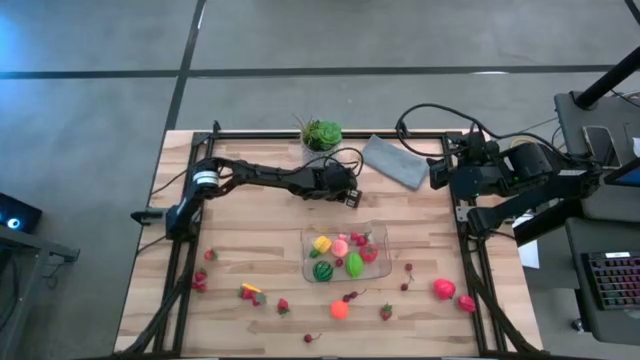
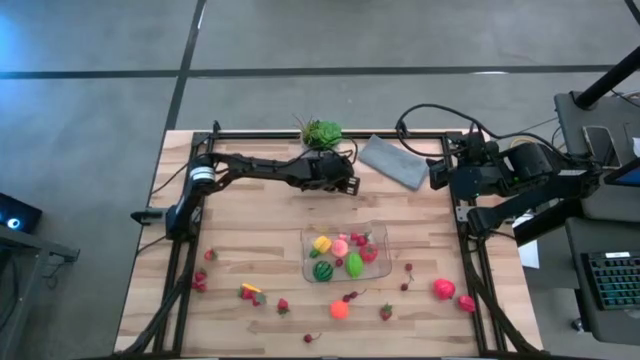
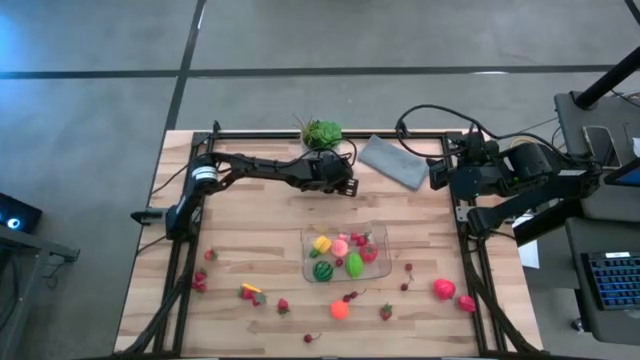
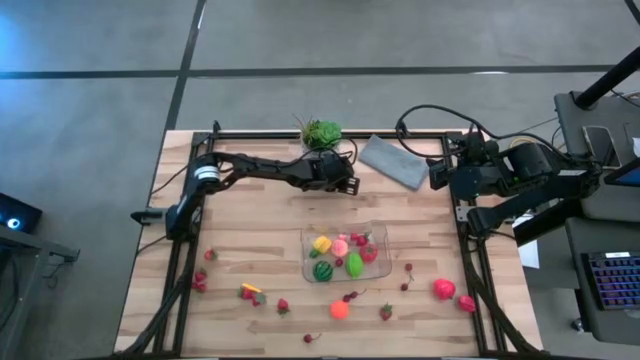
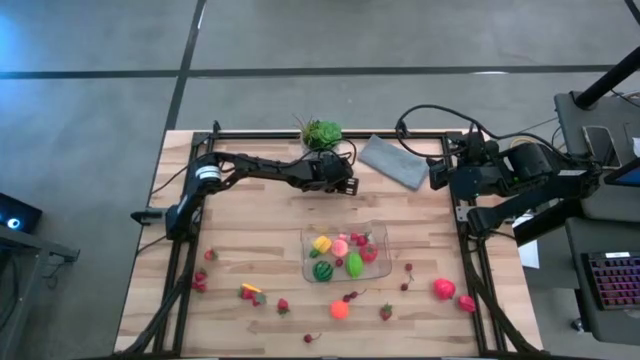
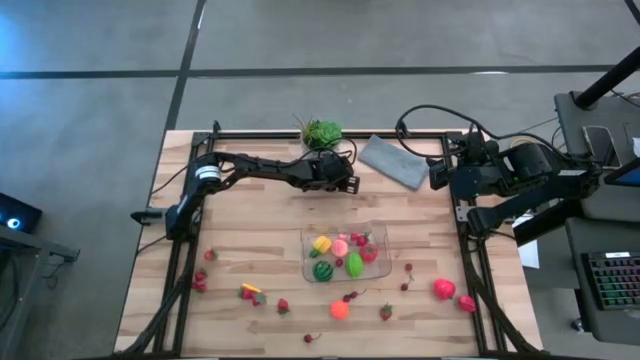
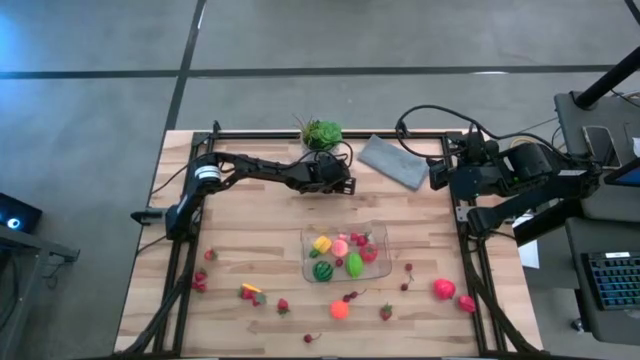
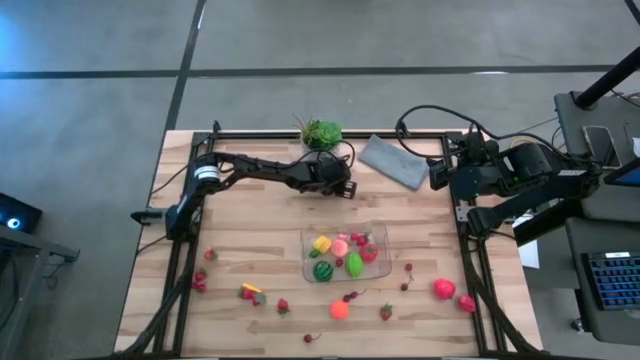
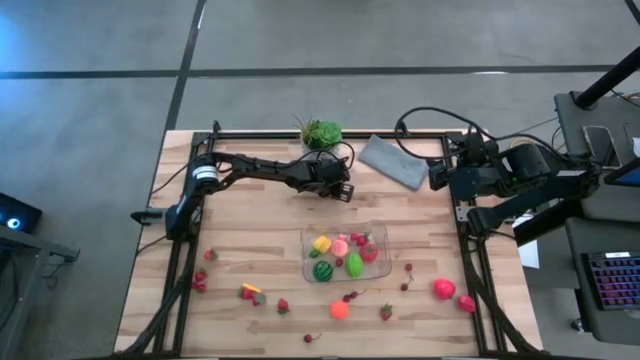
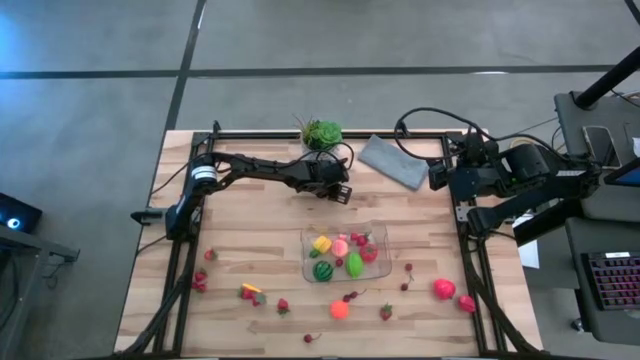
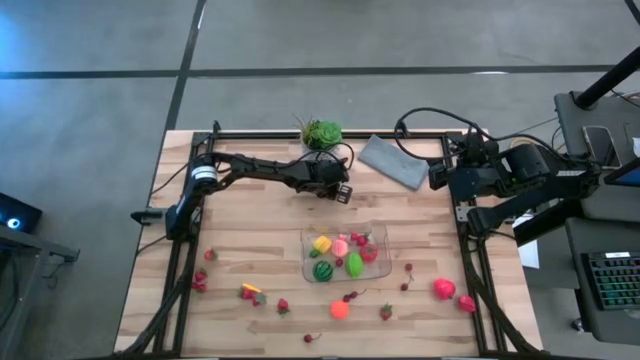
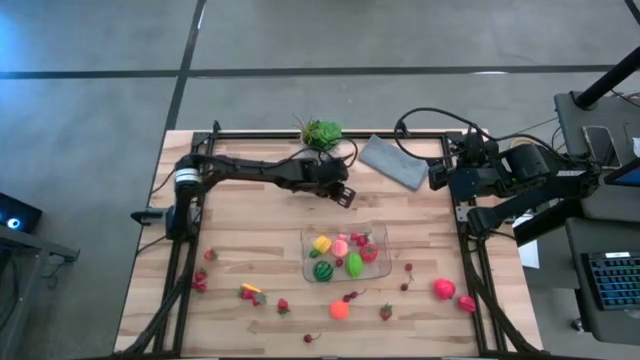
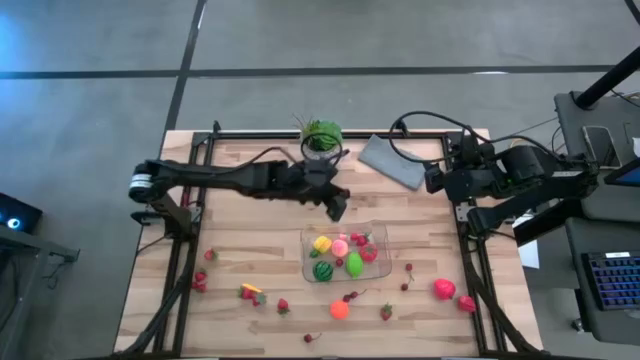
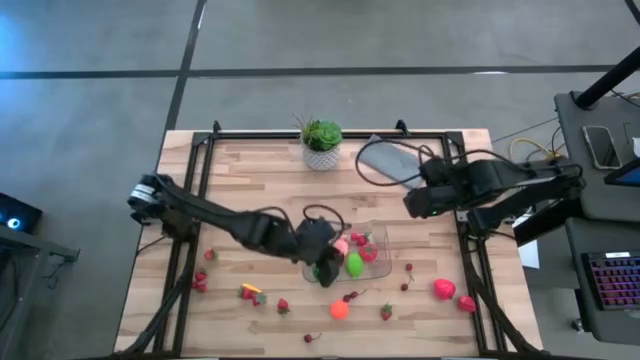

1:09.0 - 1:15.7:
Task: Pick and placing Produce into tupperware
Put the cherry into the transparent bin

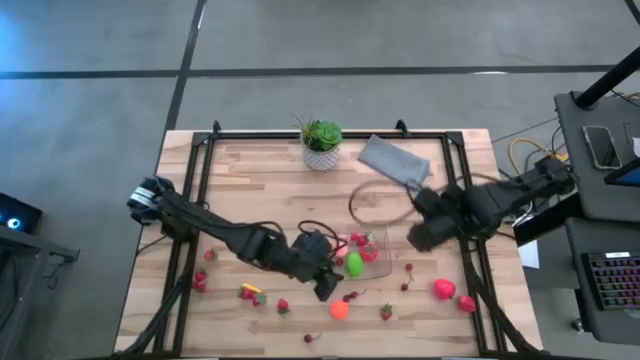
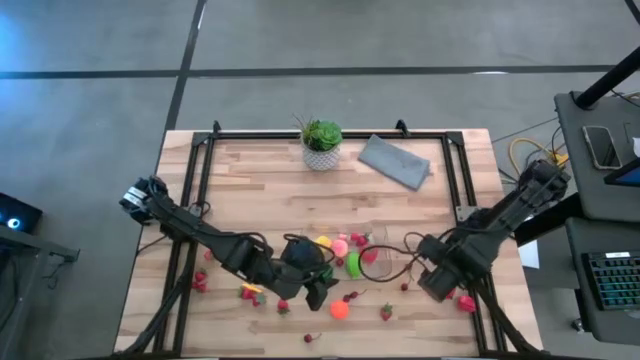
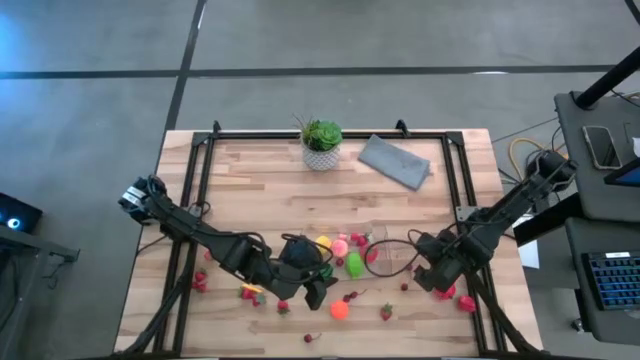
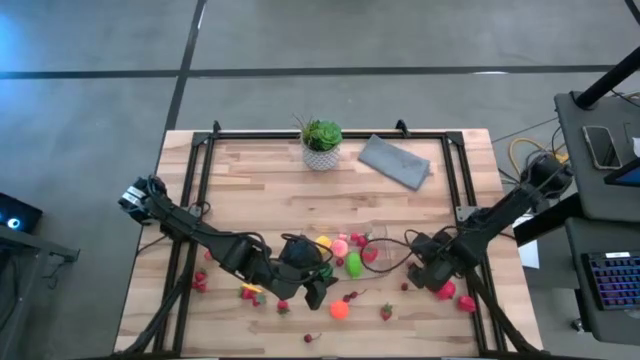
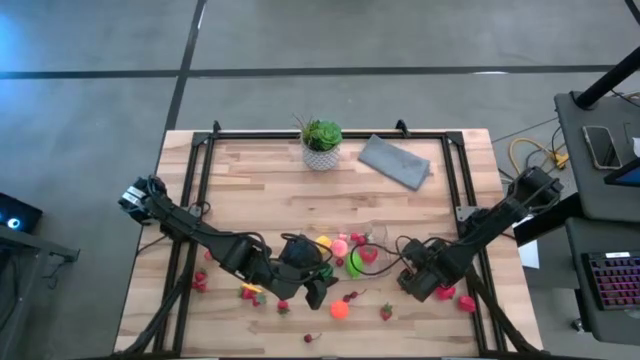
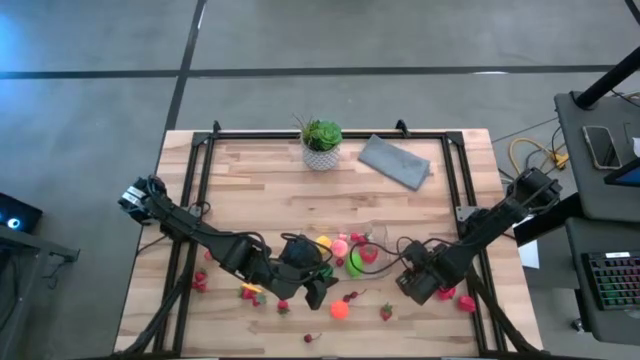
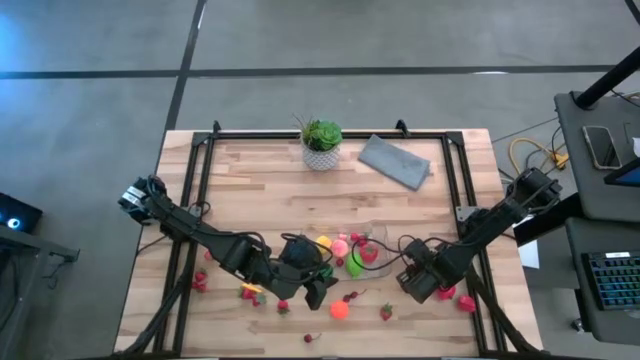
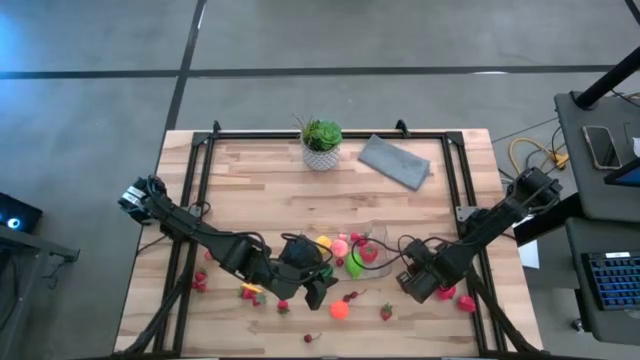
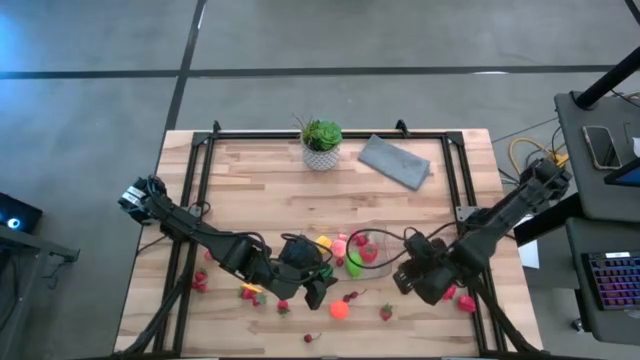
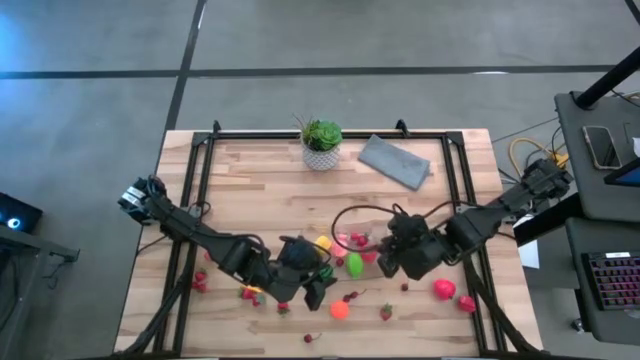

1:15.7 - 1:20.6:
Put the cherry into the transparent bin

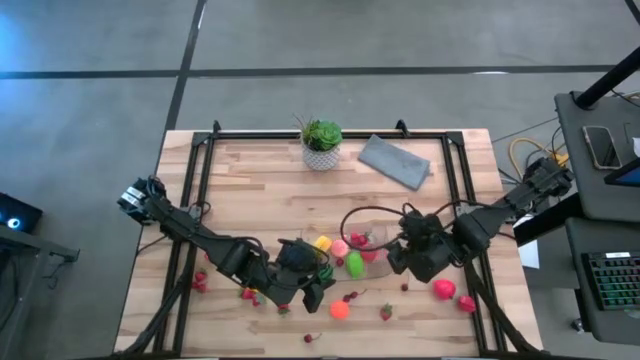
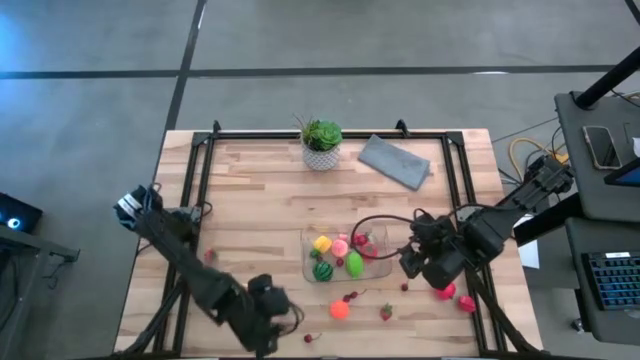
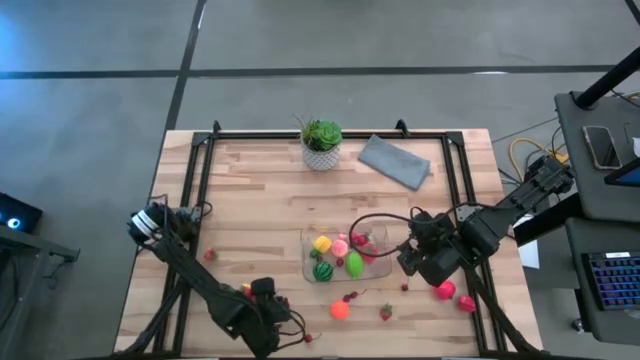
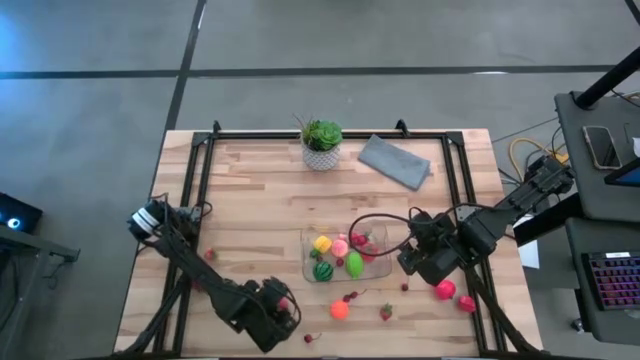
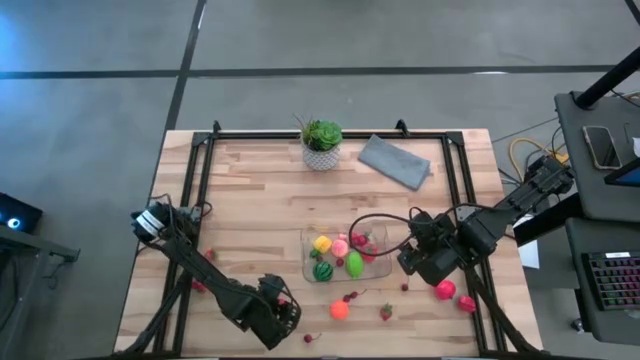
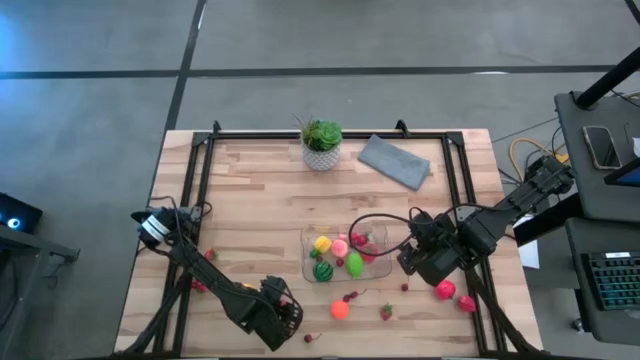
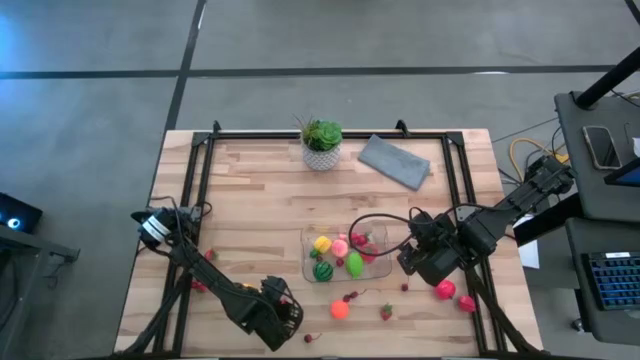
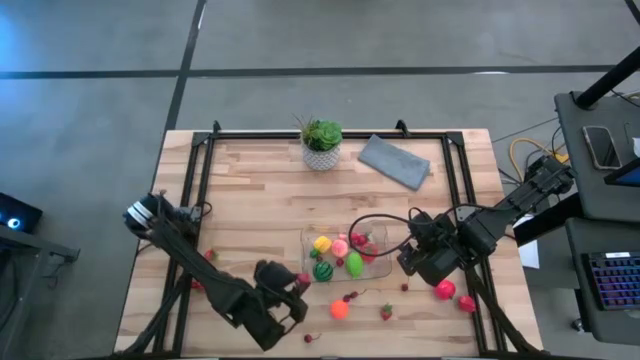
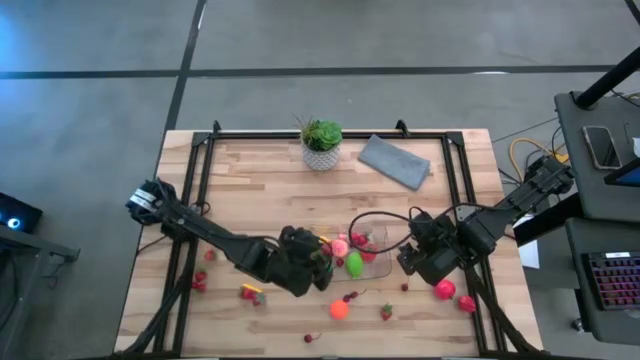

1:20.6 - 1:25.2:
Put the strawberry into the transparent bin

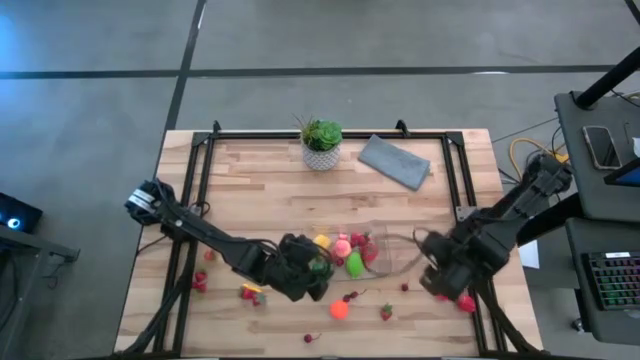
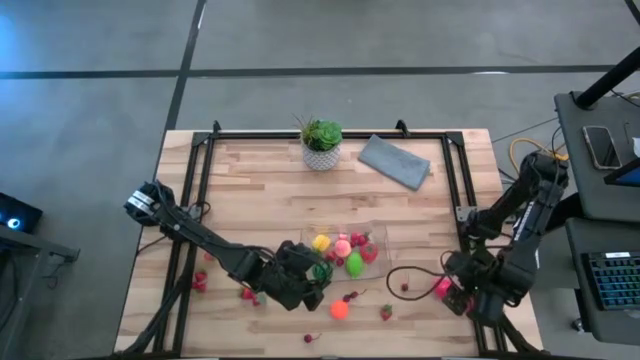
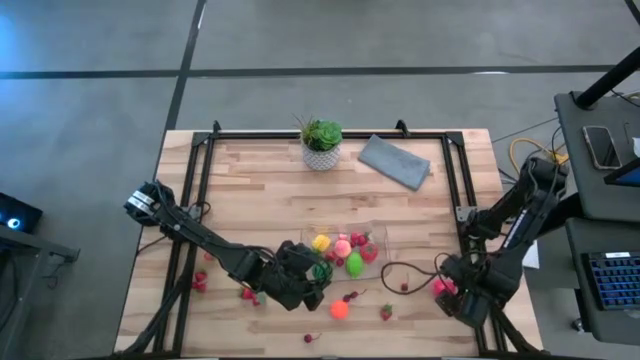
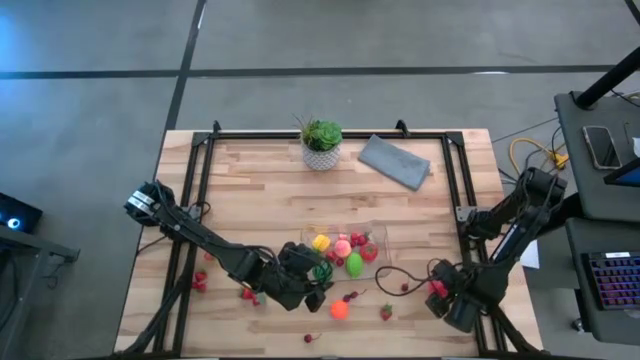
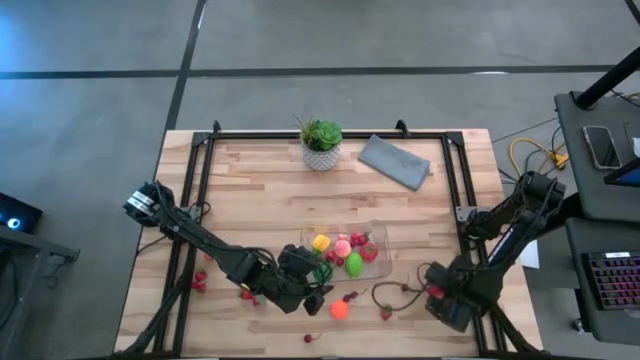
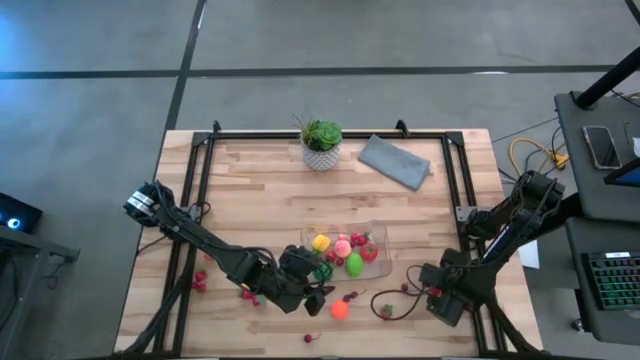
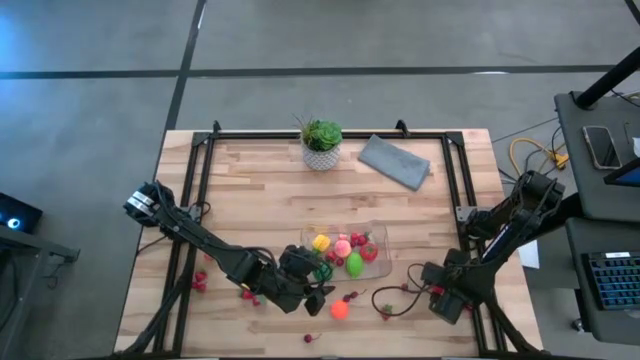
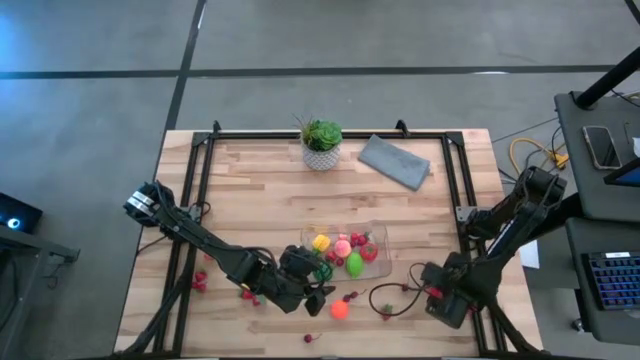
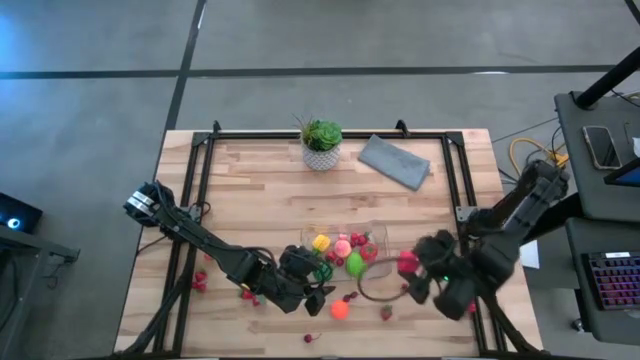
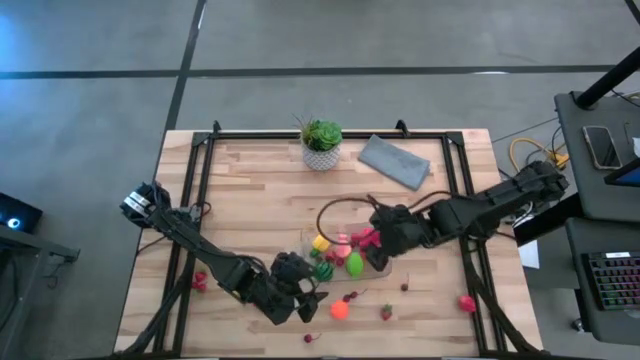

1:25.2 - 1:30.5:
Put the apple into the transparent bin
